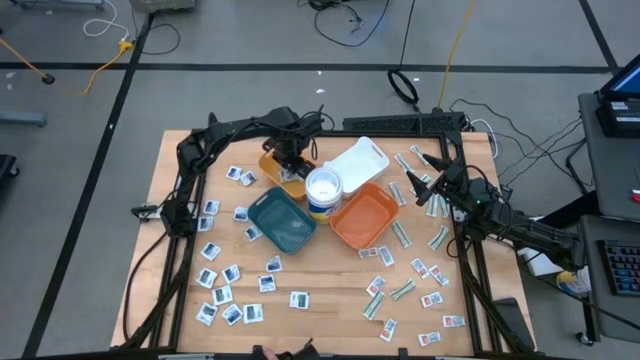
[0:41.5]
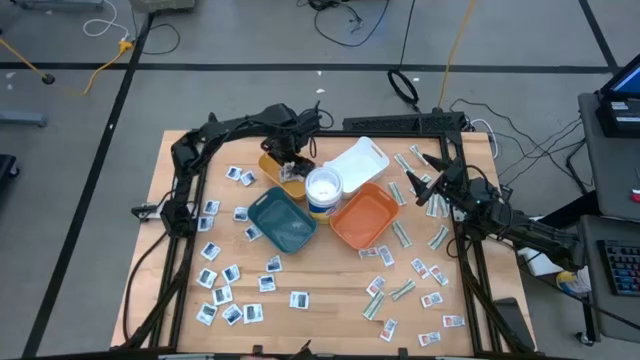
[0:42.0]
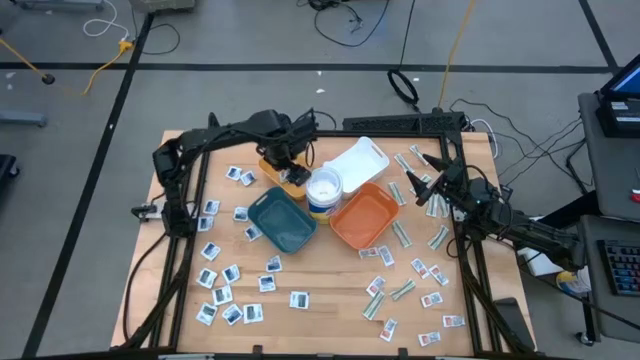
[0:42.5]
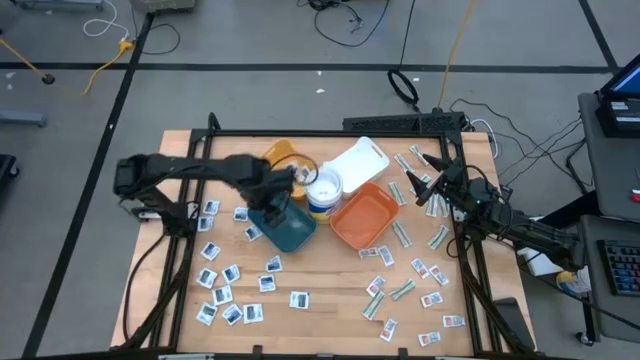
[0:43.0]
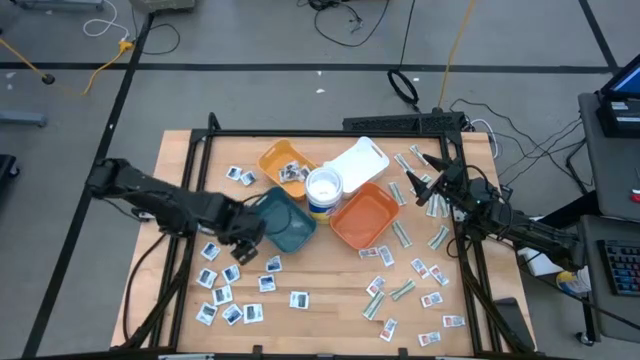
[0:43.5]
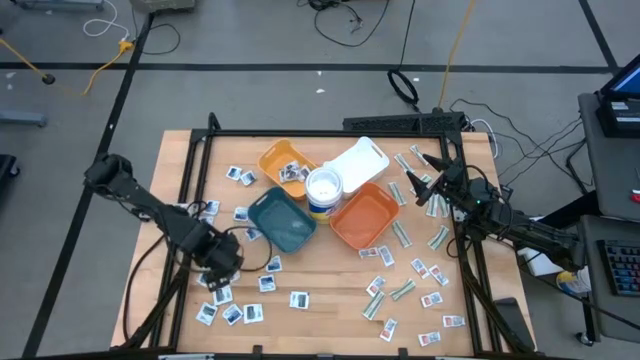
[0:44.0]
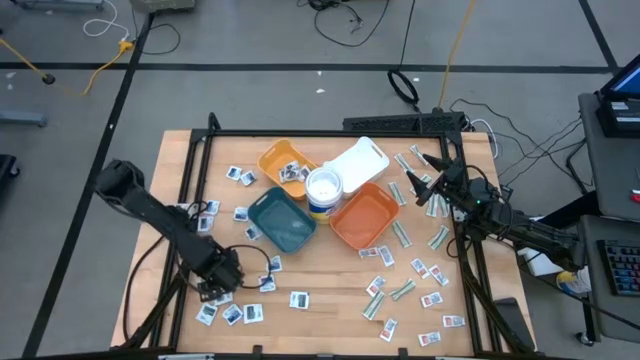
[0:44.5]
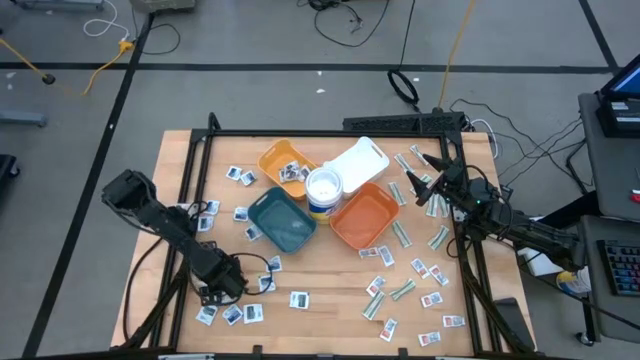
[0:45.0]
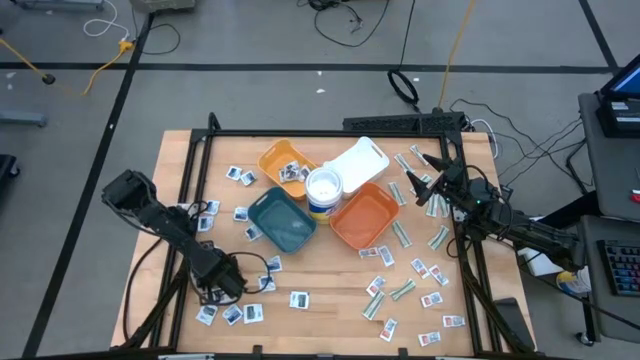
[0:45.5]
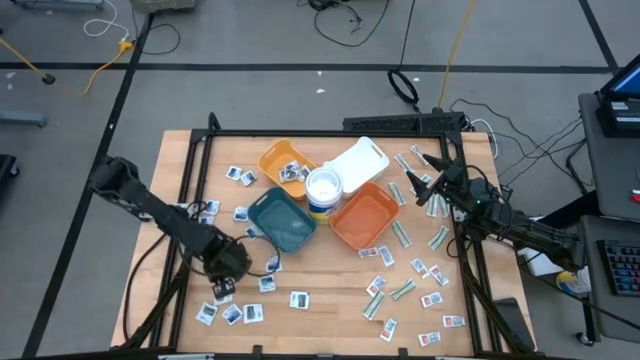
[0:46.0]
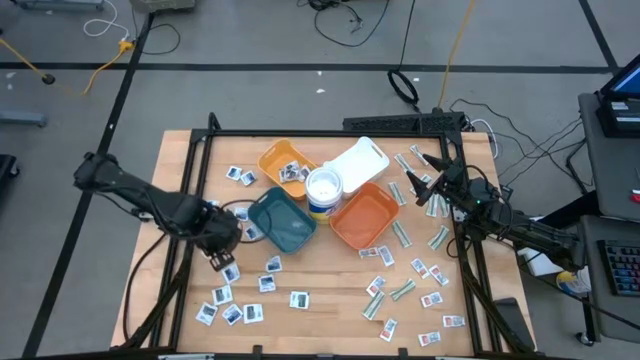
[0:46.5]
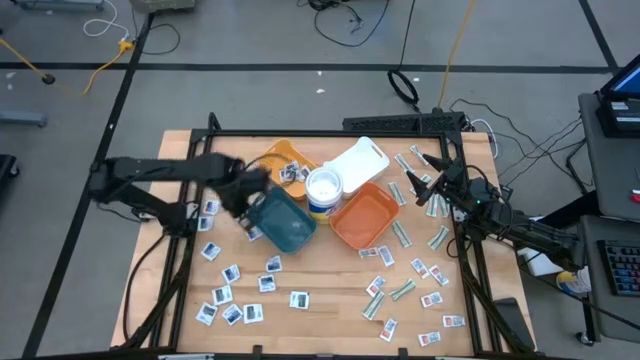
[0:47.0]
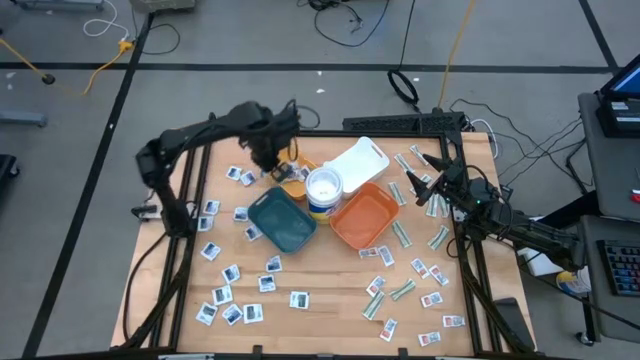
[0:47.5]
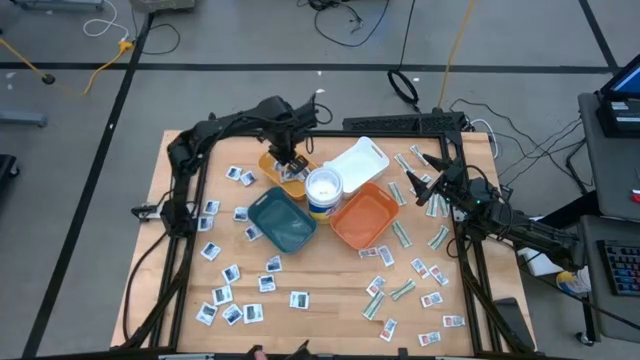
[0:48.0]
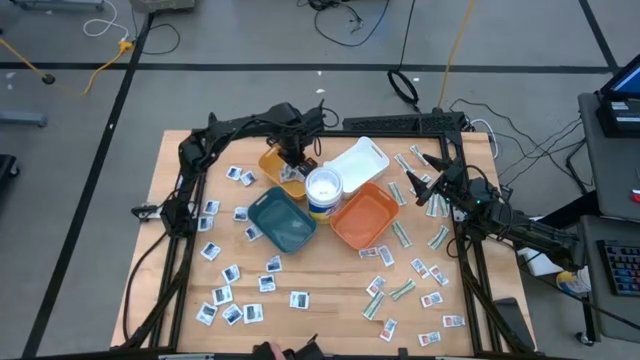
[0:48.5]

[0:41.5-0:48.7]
Task: Pick & Place First Aid Supplies
Put the black pad into the yellow bin

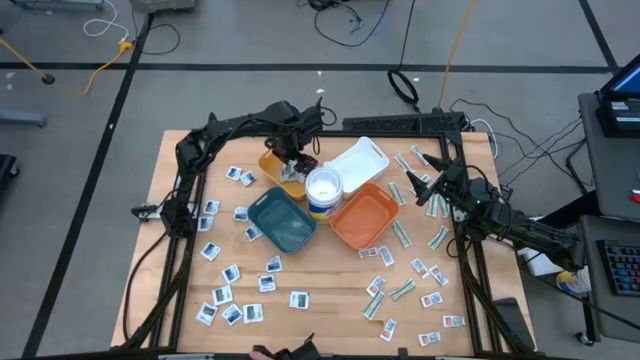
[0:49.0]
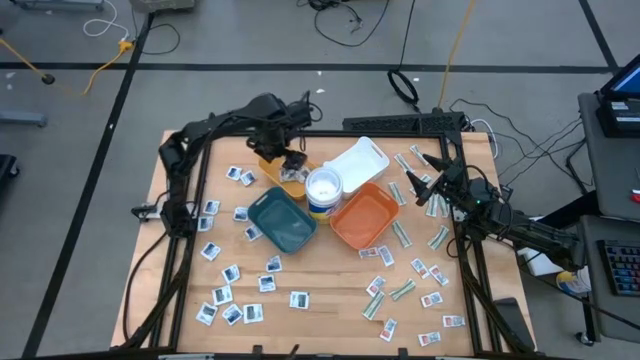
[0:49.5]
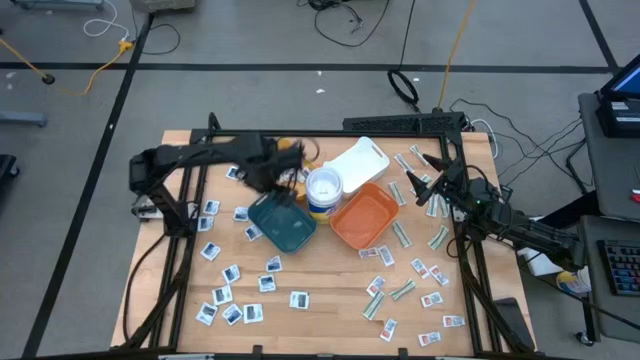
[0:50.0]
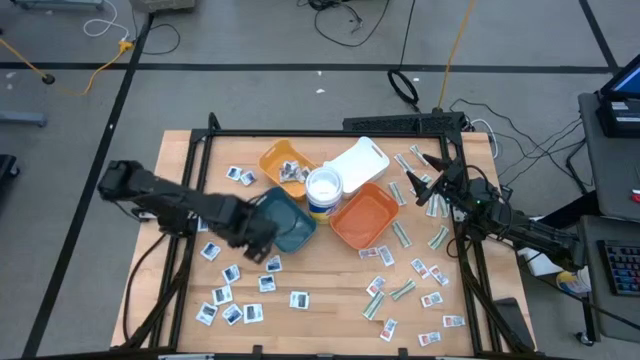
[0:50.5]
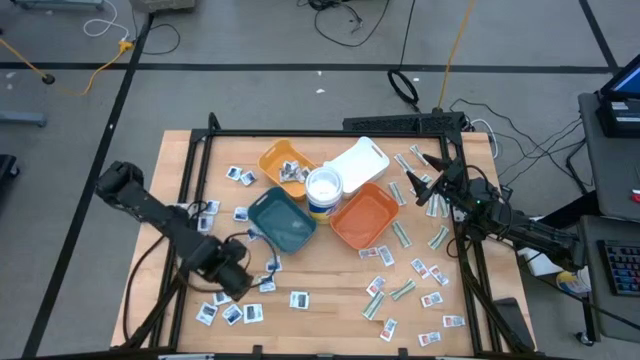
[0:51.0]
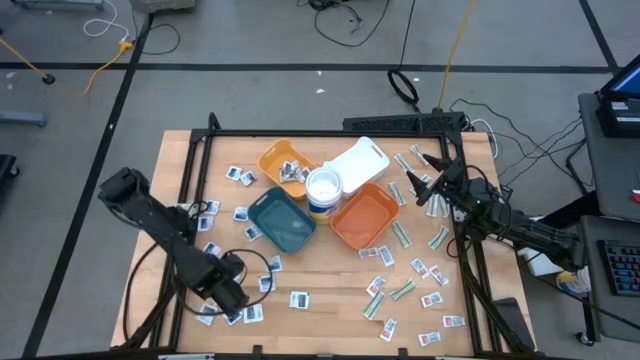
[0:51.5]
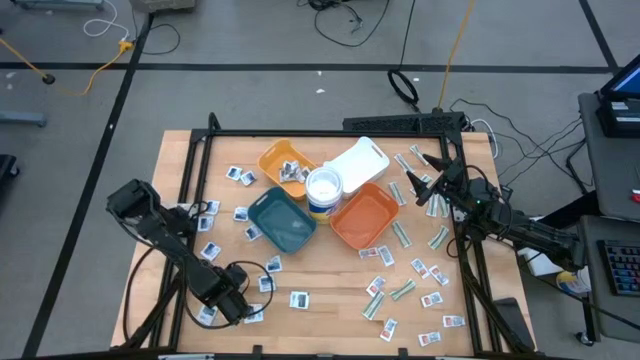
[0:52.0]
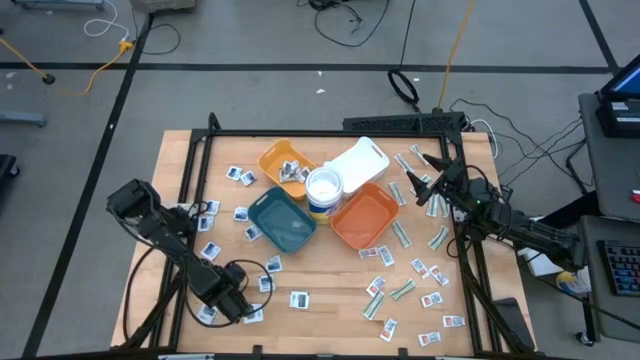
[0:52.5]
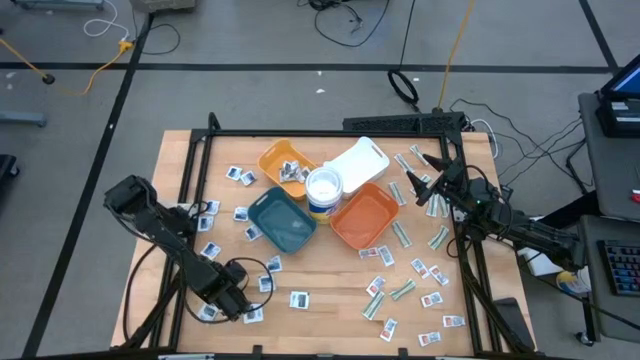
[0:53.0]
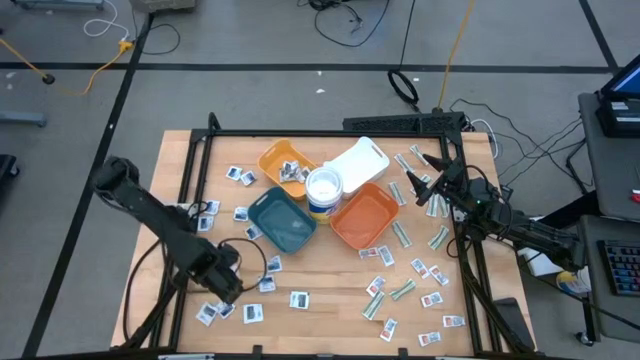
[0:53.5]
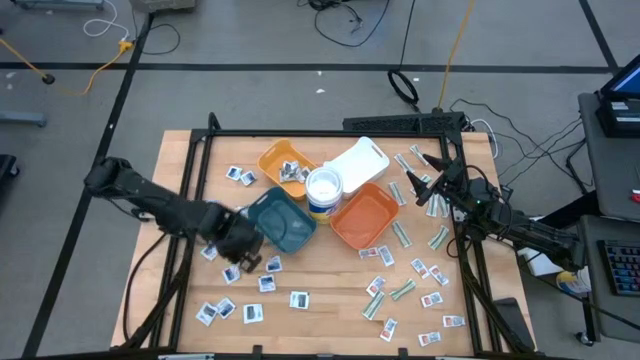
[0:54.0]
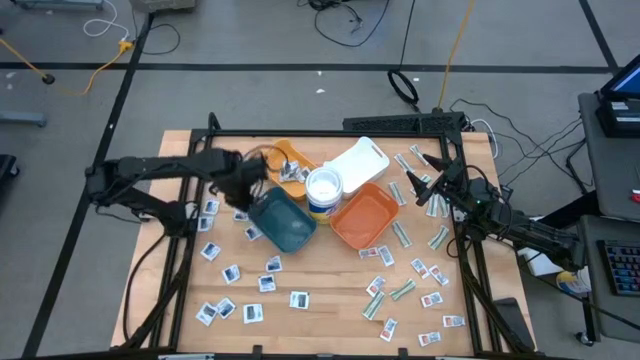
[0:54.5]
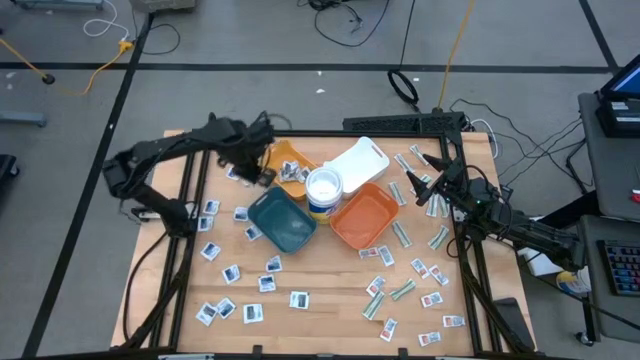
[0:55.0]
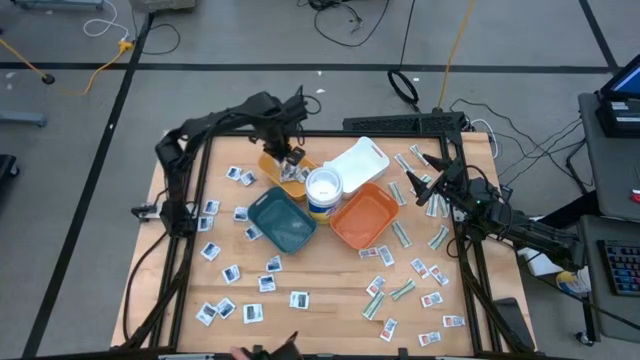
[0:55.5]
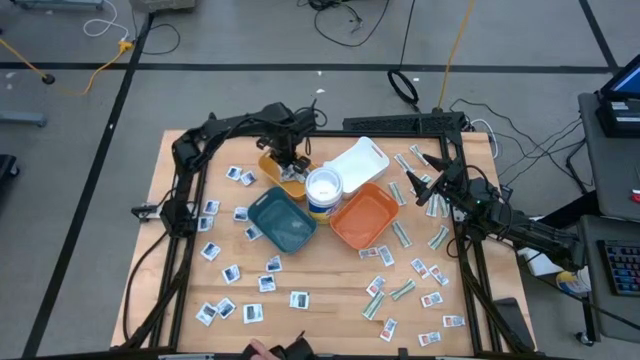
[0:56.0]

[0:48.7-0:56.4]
Put the black pad into the yellow bin

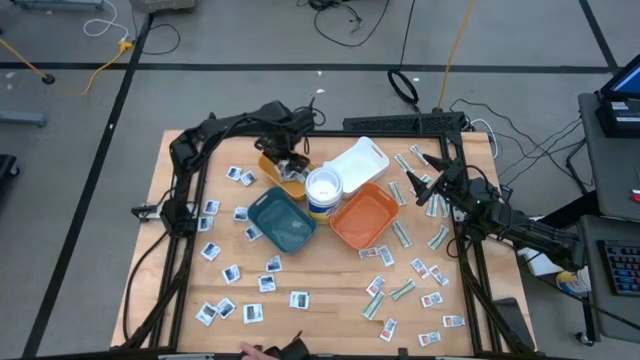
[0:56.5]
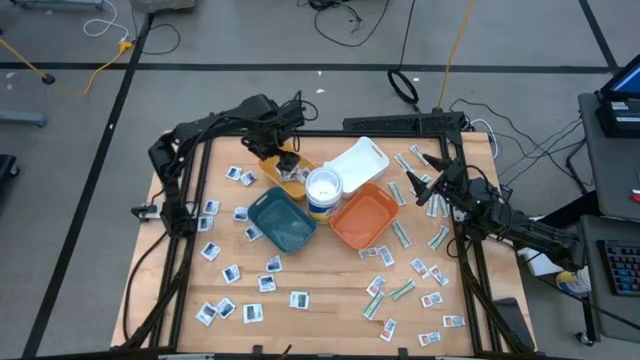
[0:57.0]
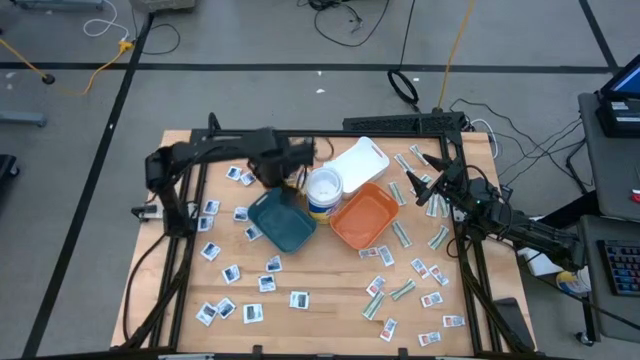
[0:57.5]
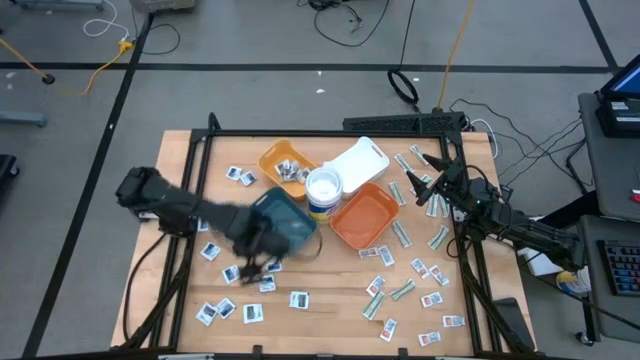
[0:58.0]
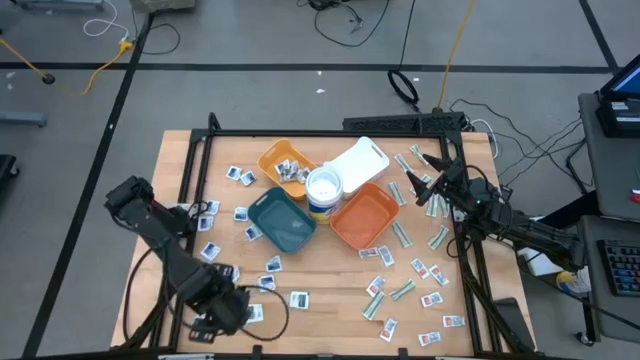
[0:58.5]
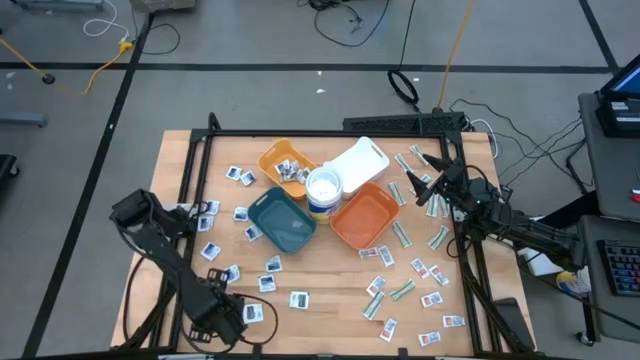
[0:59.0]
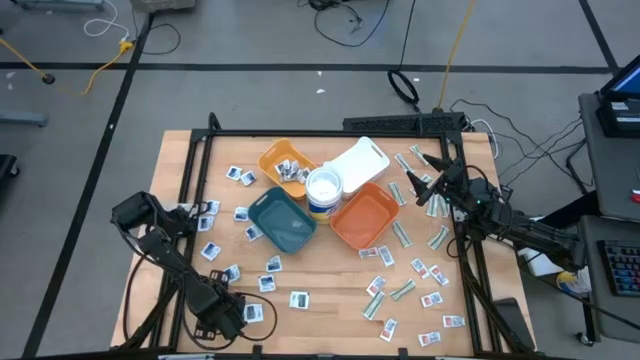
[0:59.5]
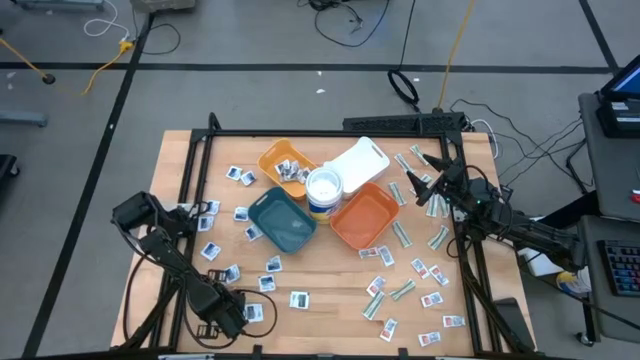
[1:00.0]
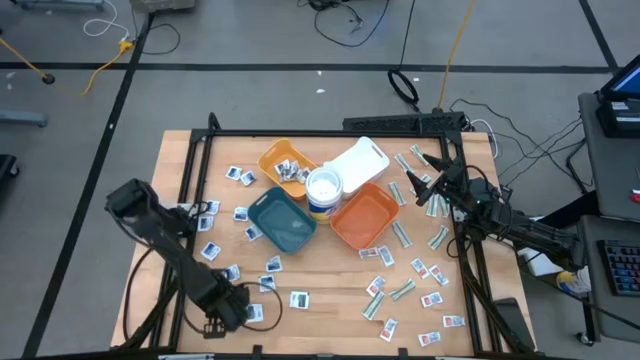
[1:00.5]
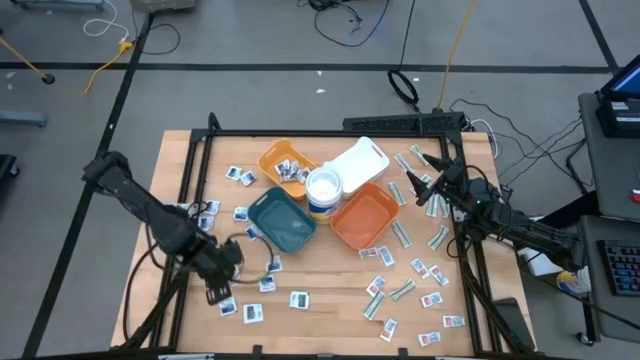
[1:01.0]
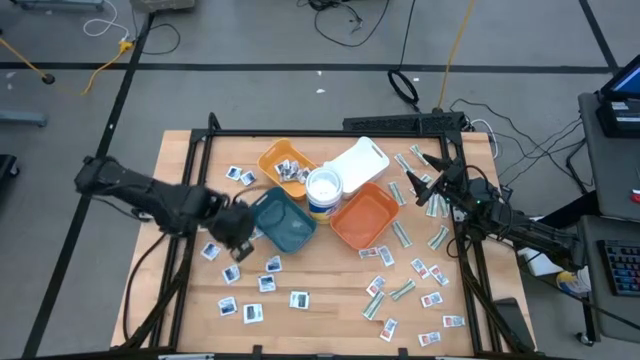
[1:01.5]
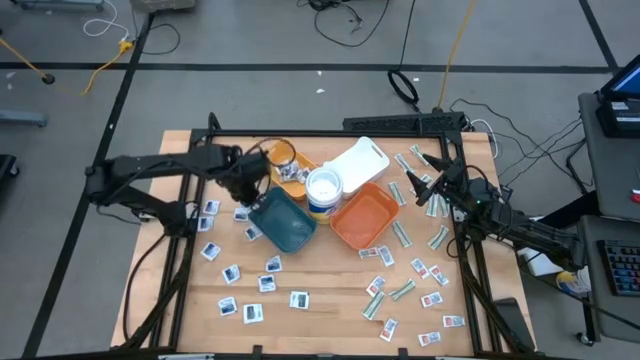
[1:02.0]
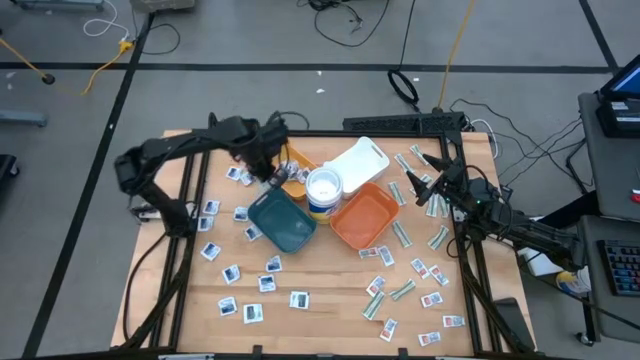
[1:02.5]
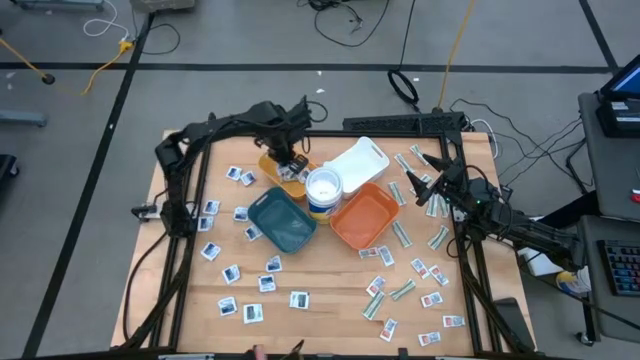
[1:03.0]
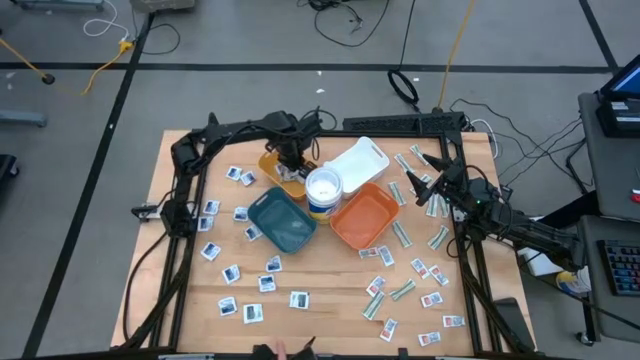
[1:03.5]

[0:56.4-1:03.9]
Put the black pad into the yellow bin
